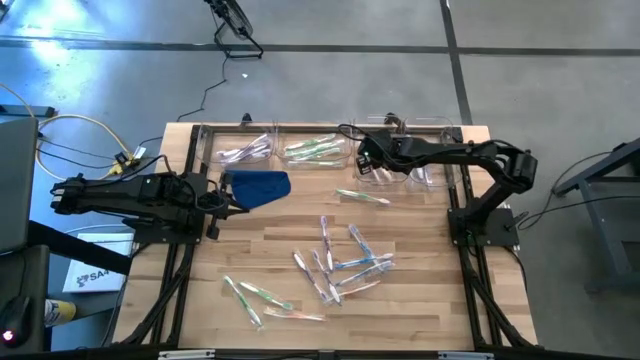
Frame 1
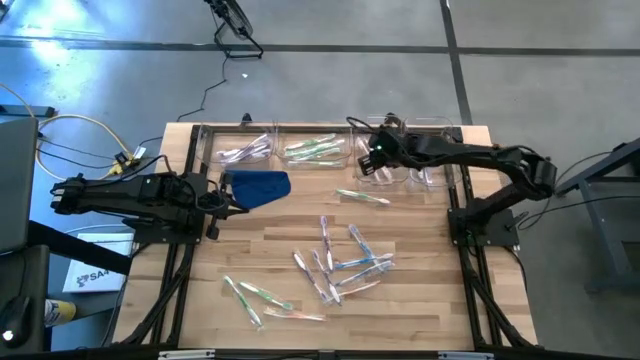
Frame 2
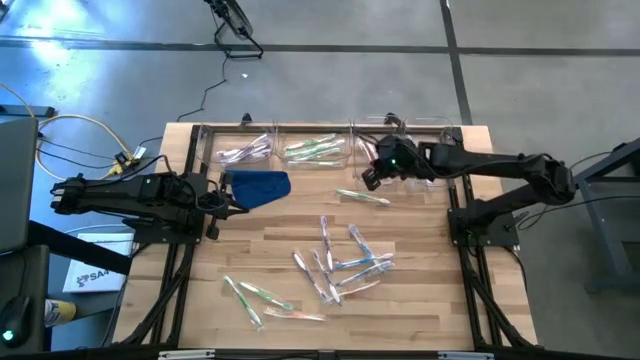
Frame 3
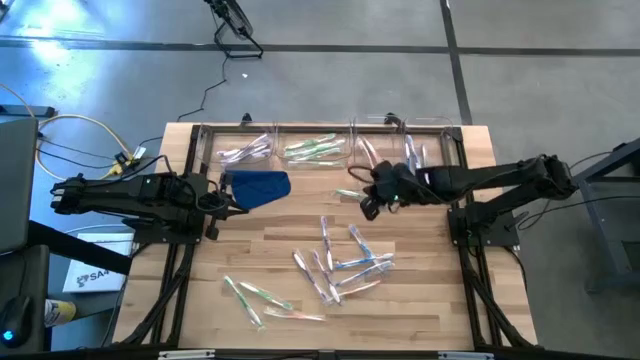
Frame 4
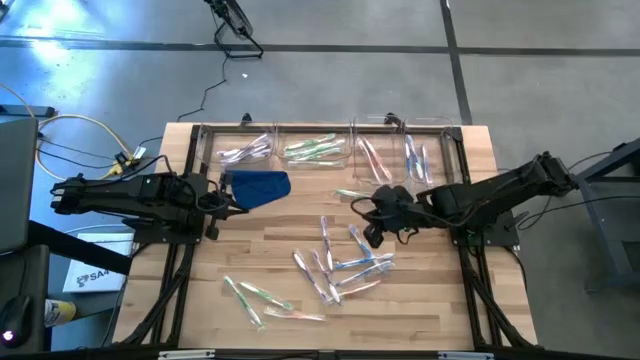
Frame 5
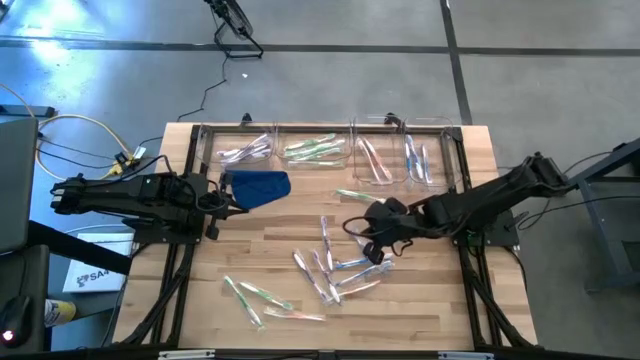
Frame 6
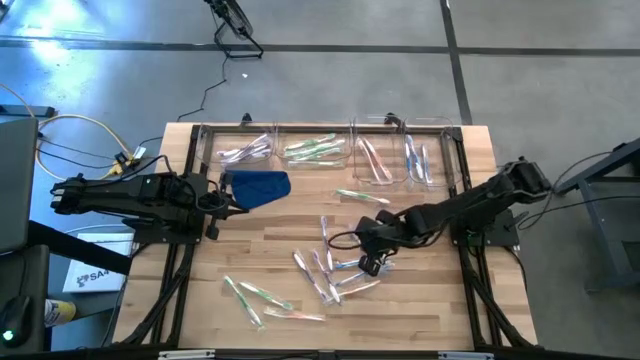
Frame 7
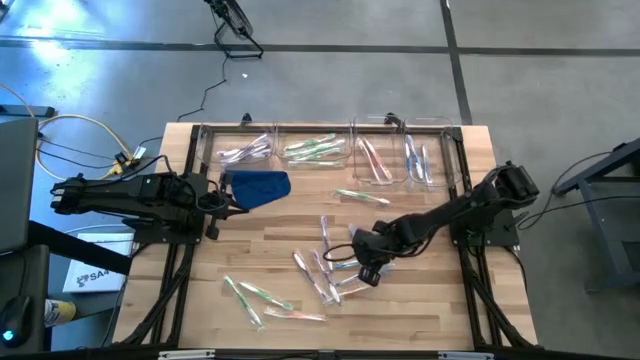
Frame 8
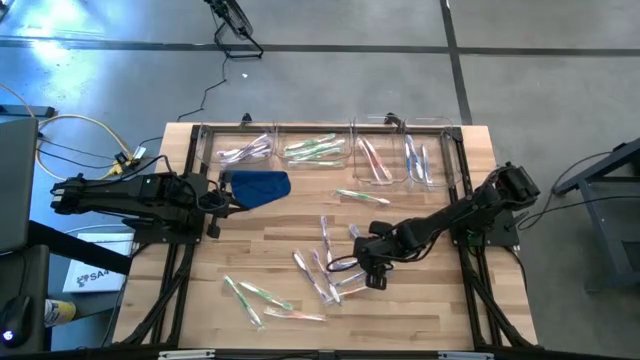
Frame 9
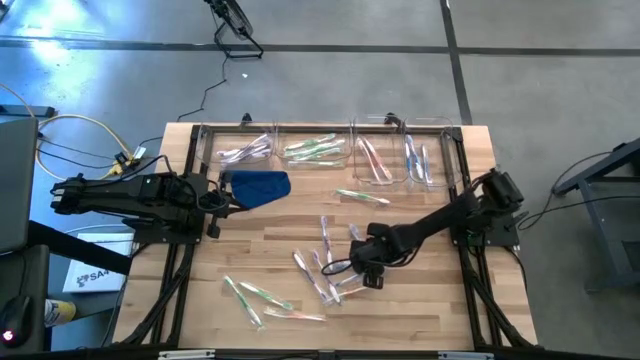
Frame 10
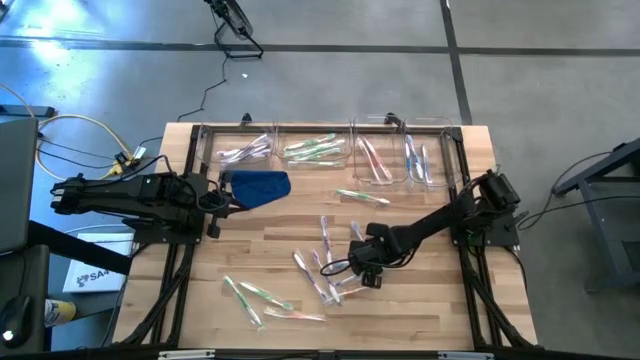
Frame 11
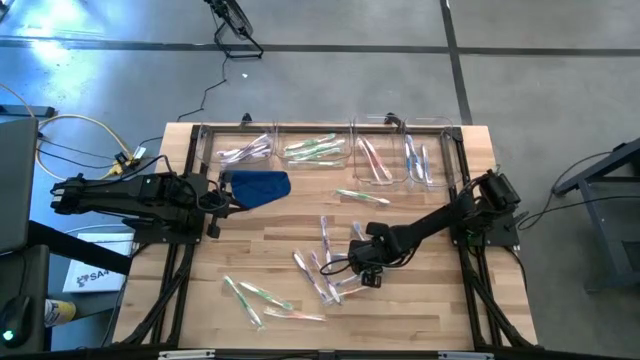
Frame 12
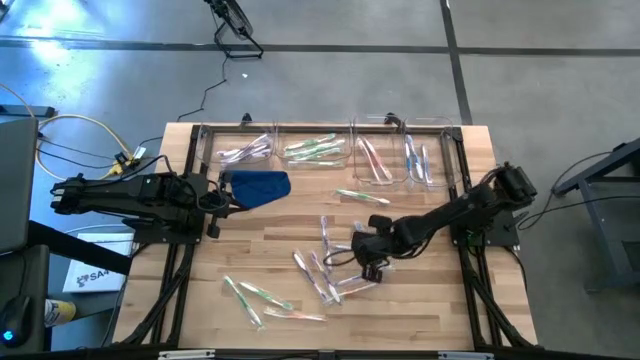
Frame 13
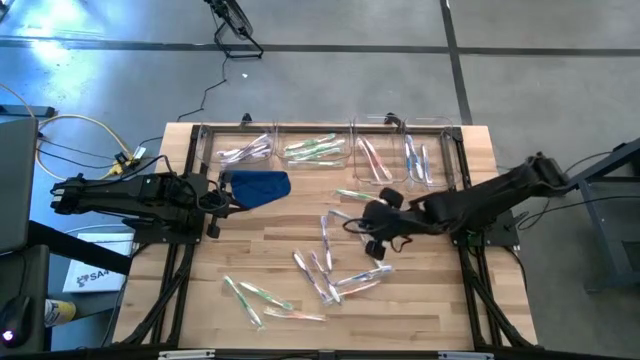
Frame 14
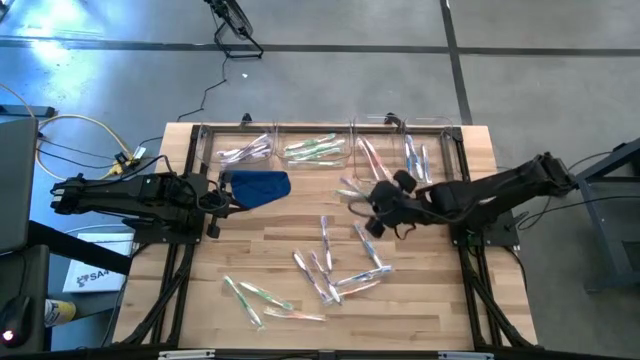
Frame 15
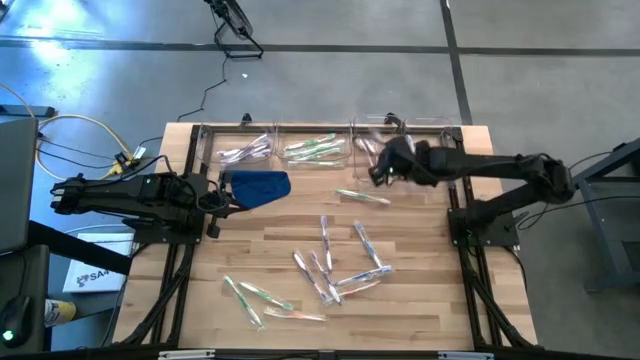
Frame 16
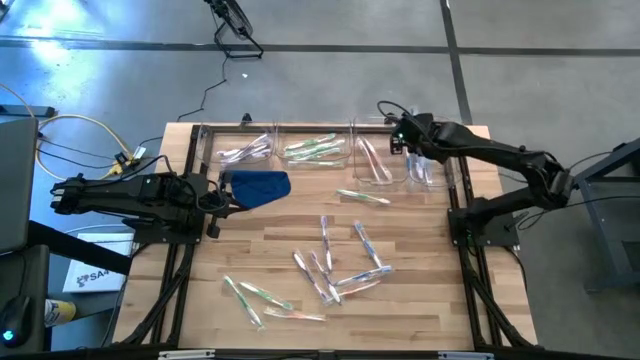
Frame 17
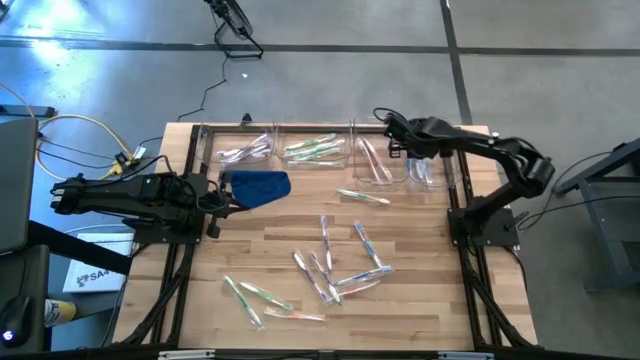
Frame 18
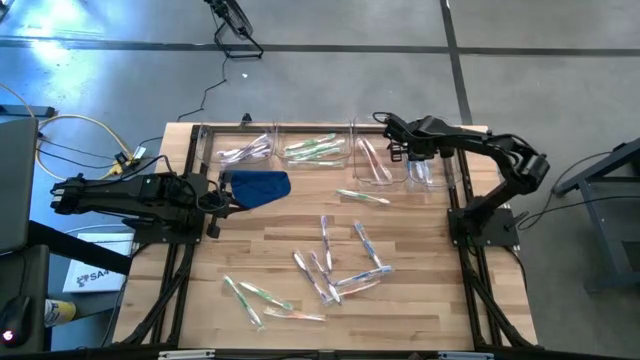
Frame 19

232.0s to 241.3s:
Task: Pick & Place Toothbrushes
Put the blue toothbrush into the right transparent bin

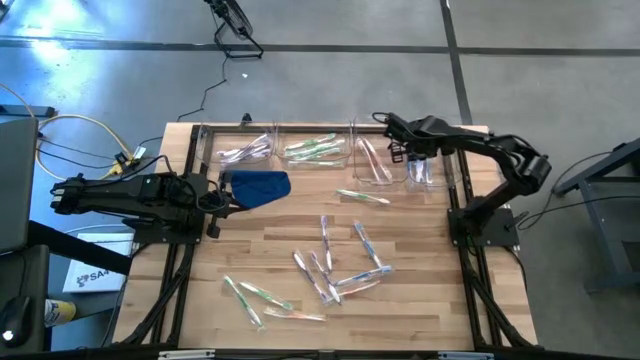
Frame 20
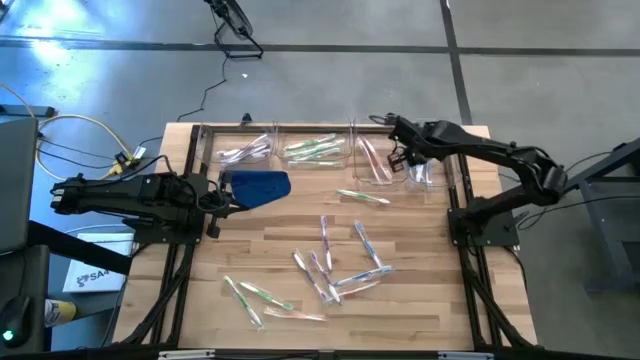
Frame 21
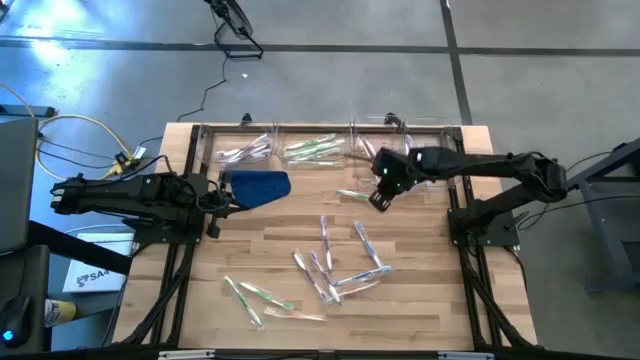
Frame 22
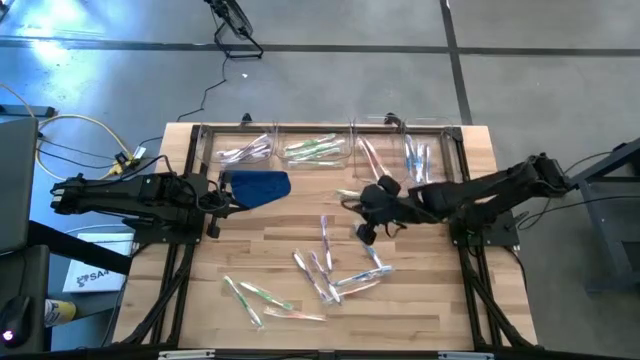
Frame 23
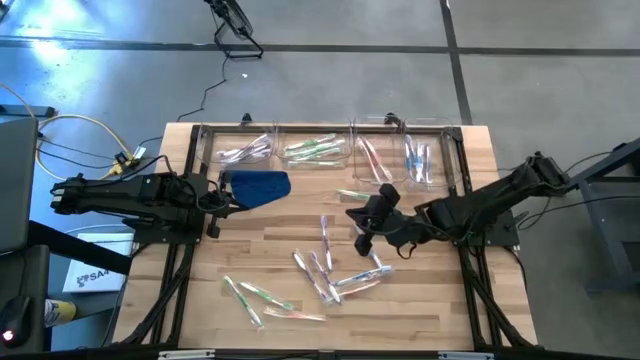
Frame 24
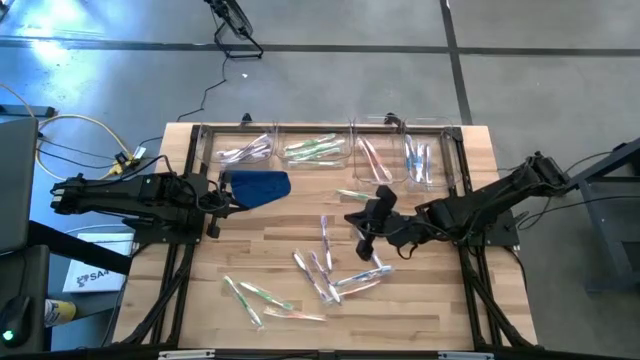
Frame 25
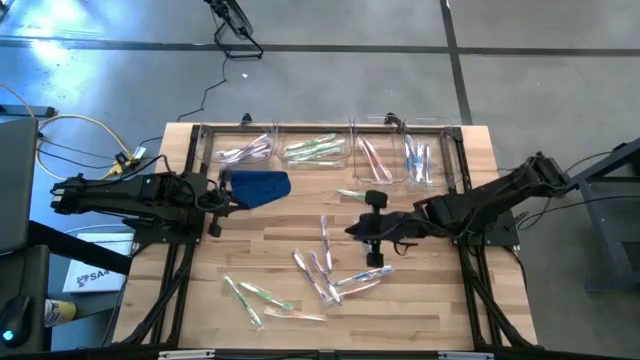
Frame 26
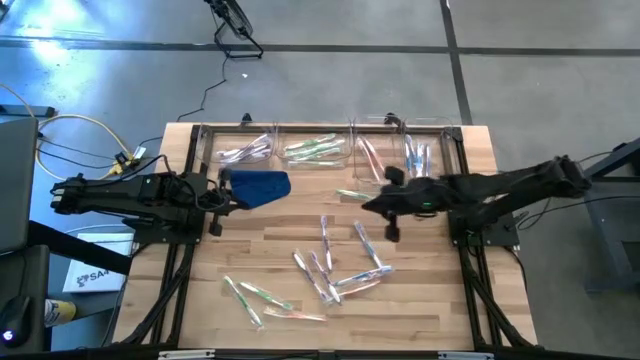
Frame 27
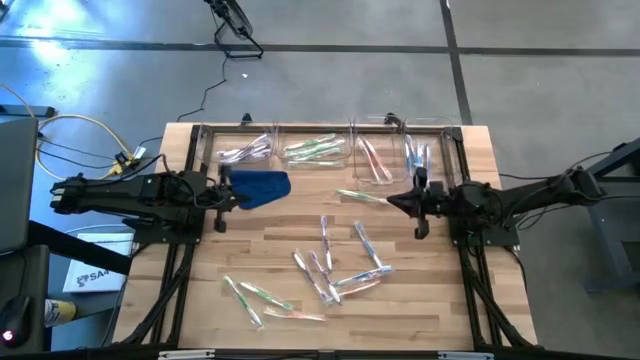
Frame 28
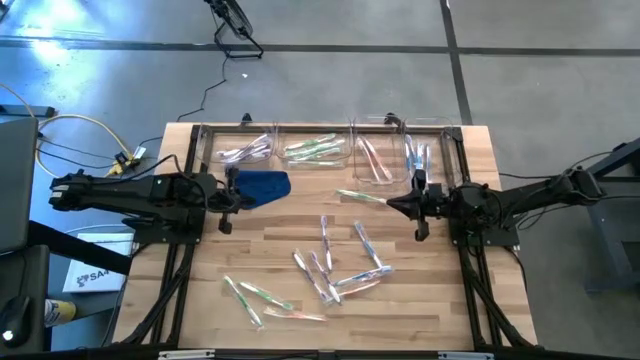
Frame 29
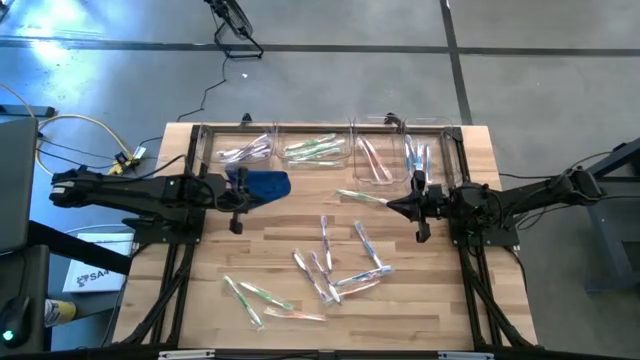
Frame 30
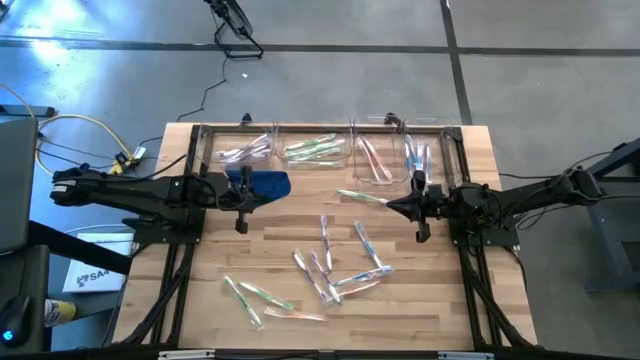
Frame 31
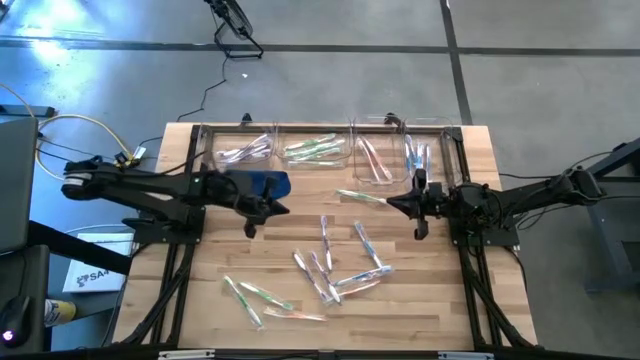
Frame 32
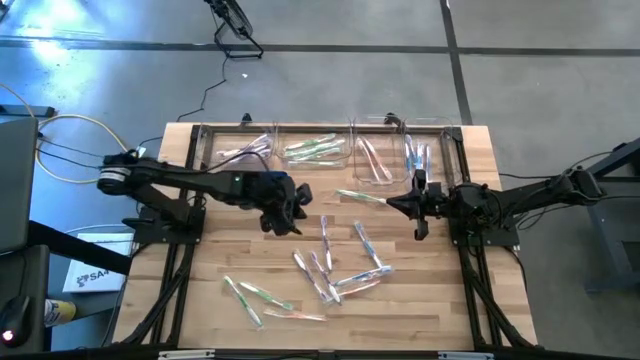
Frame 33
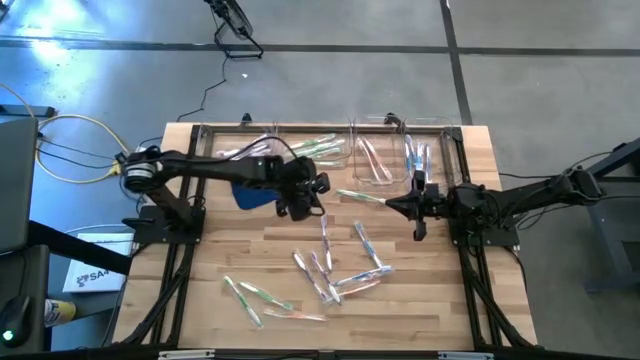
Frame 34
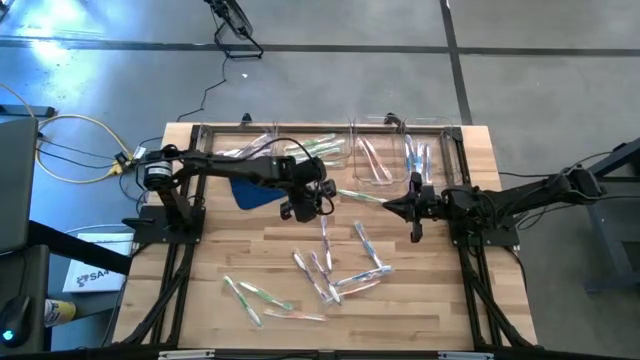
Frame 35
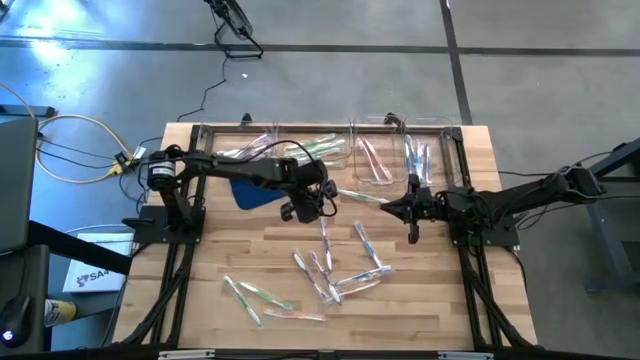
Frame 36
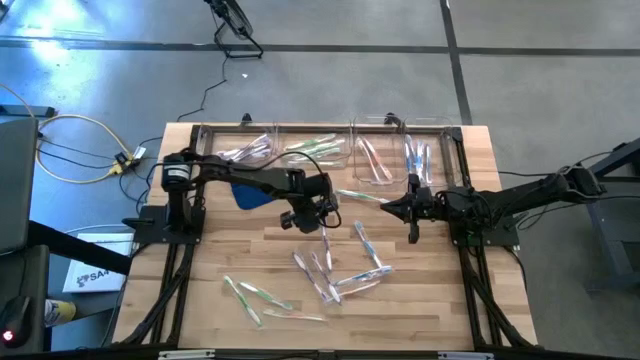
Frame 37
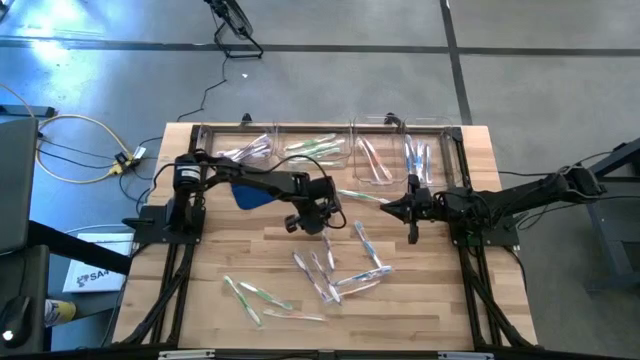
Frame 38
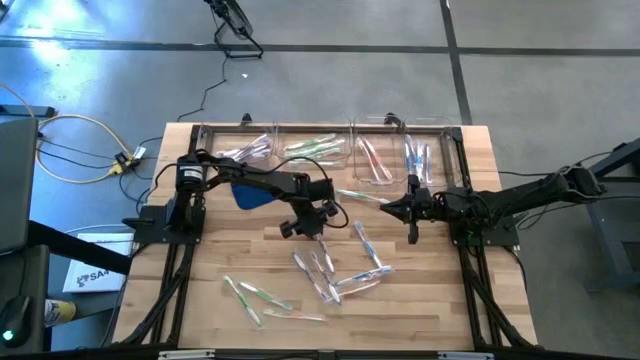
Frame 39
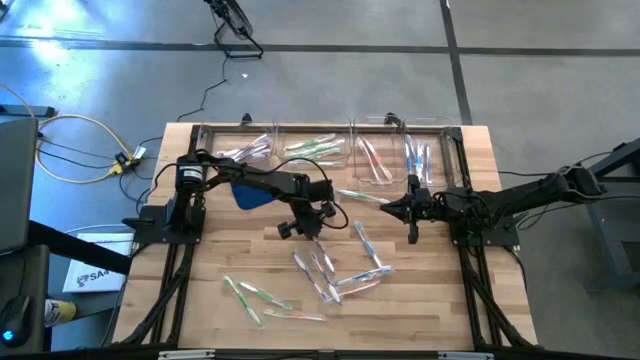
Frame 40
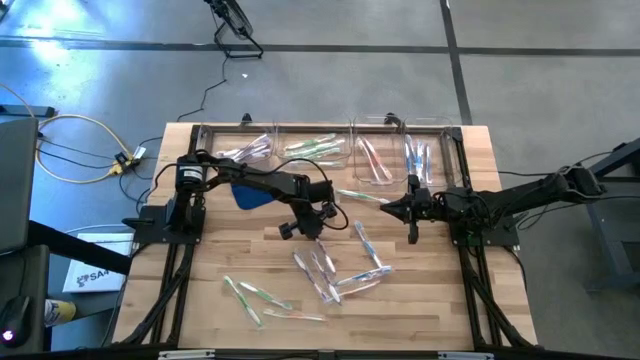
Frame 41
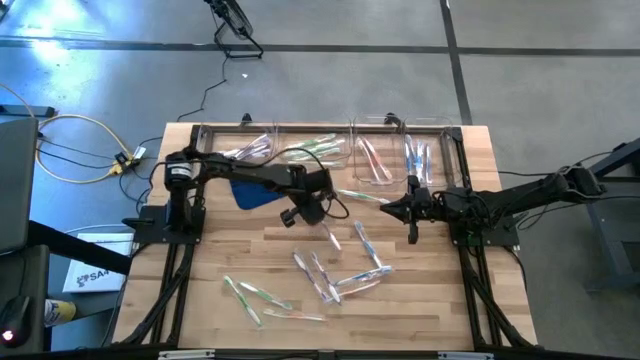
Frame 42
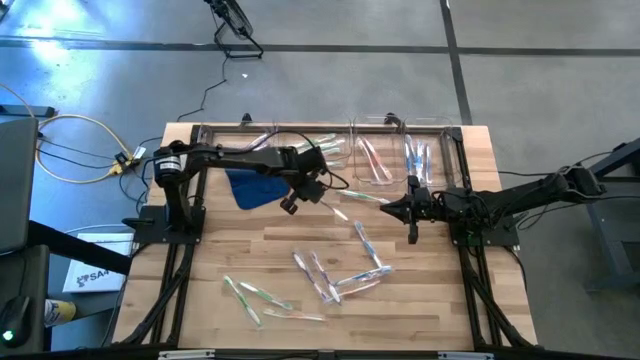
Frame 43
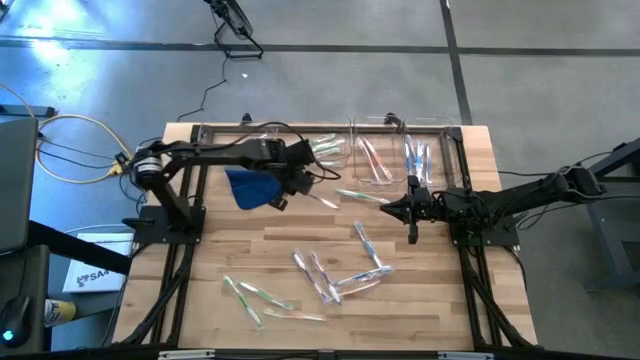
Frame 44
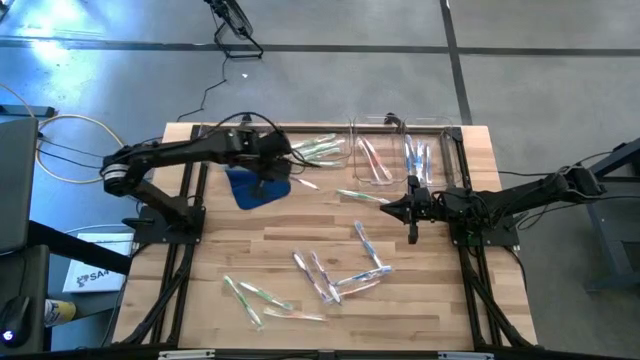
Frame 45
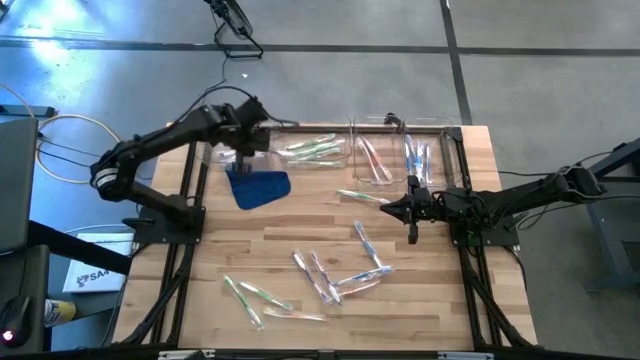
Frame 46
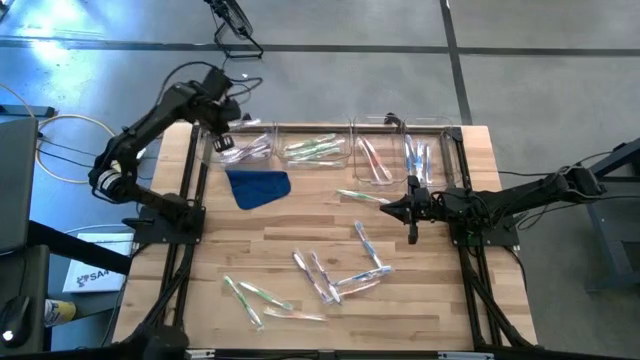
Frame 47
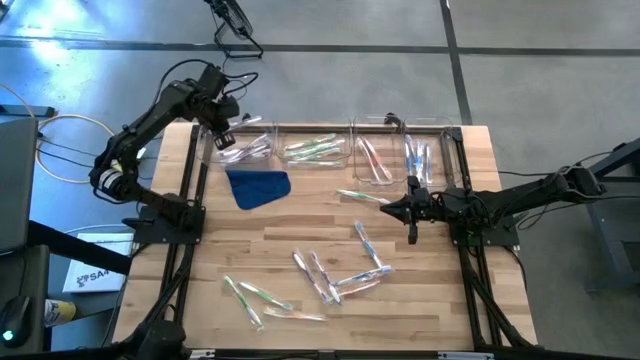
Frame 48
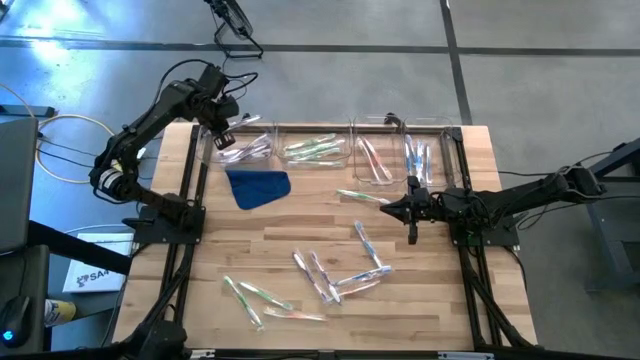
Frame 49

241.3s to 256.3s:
Put the violet toothbrush into the left transparent bin
